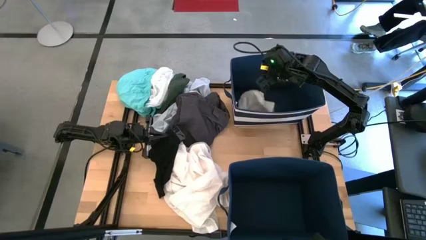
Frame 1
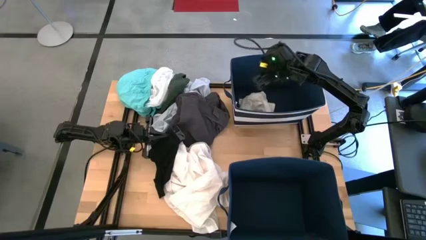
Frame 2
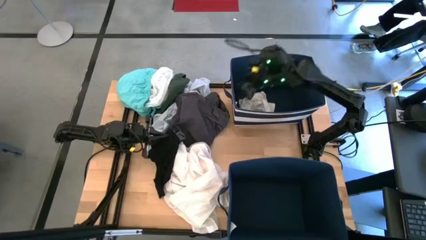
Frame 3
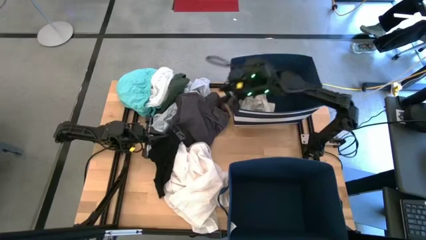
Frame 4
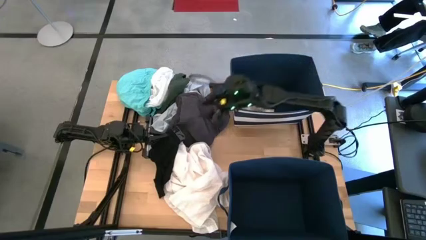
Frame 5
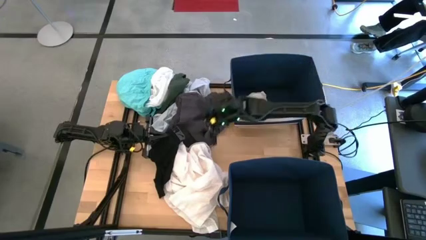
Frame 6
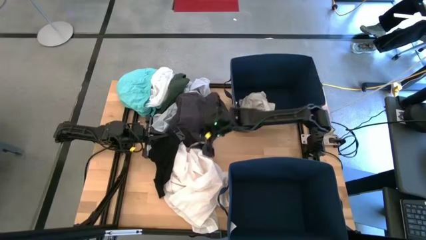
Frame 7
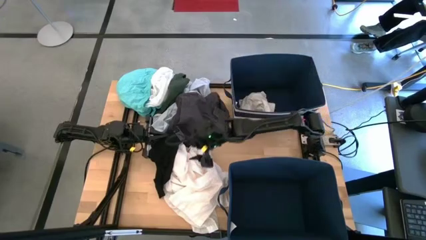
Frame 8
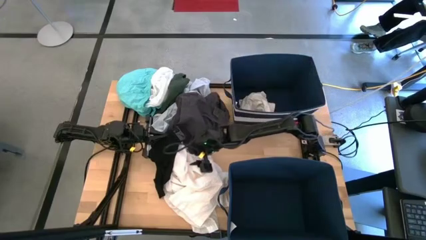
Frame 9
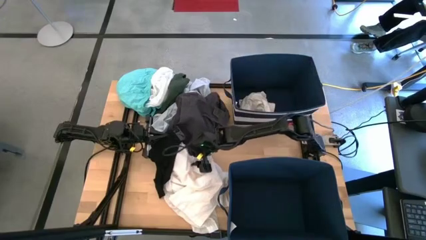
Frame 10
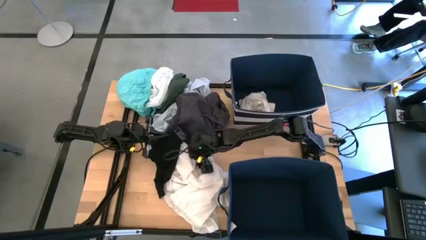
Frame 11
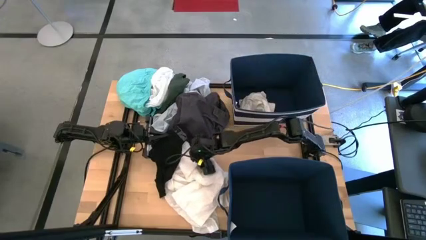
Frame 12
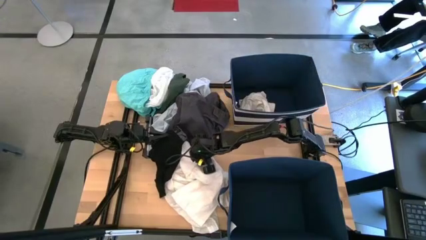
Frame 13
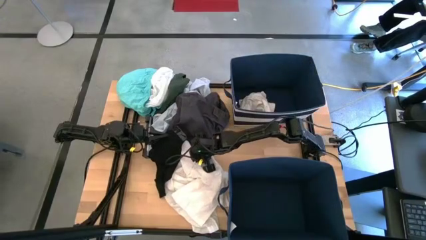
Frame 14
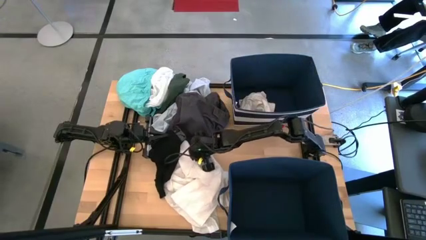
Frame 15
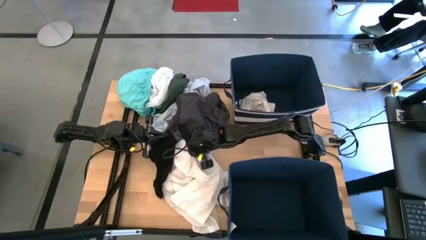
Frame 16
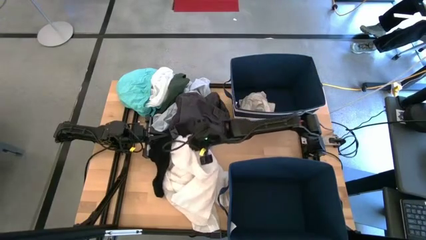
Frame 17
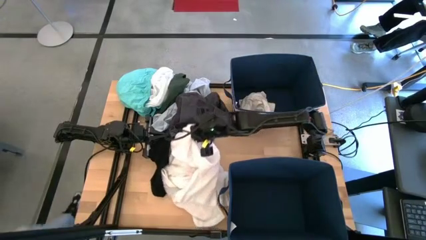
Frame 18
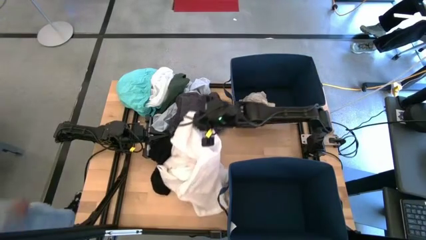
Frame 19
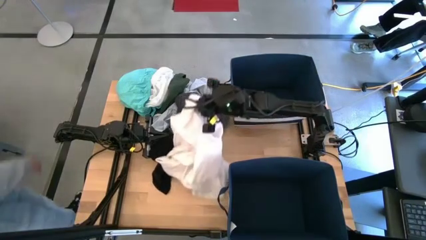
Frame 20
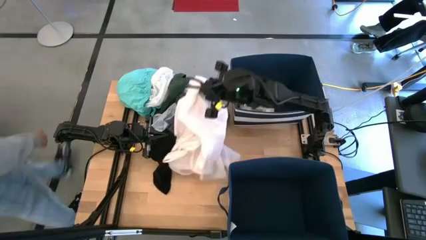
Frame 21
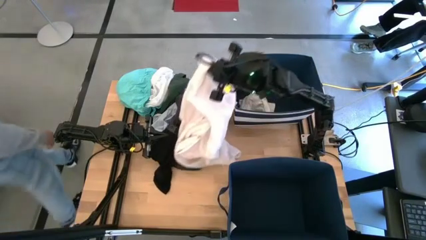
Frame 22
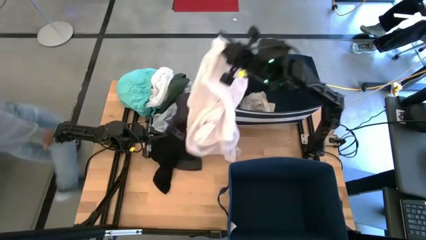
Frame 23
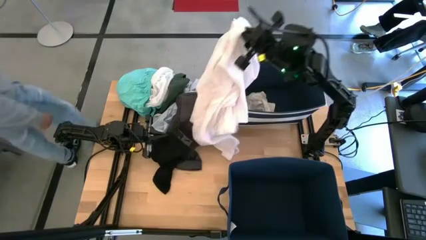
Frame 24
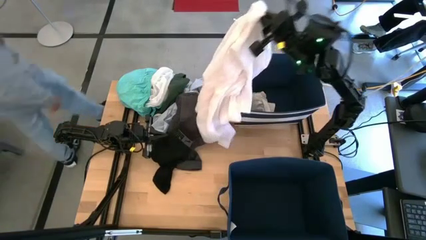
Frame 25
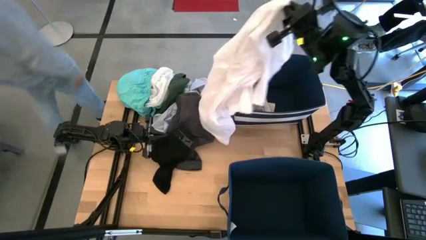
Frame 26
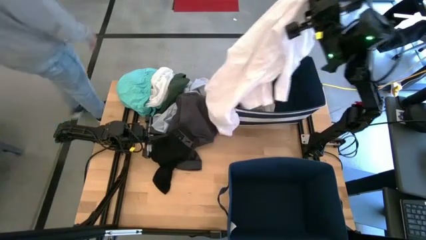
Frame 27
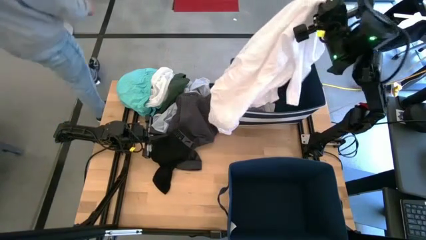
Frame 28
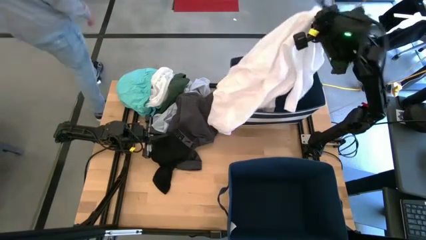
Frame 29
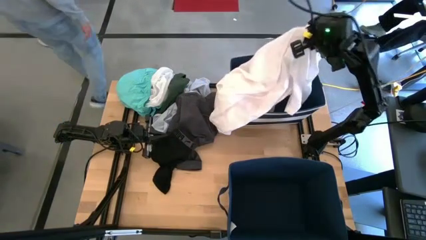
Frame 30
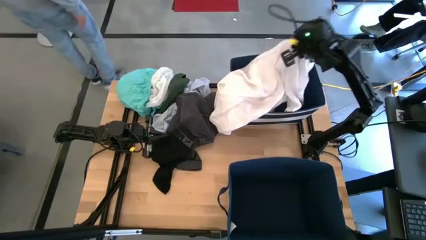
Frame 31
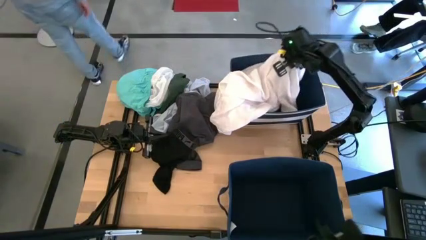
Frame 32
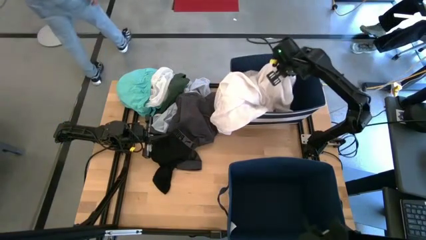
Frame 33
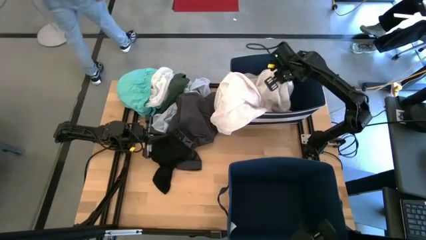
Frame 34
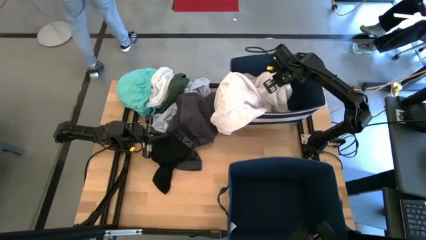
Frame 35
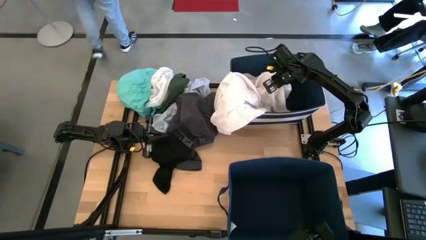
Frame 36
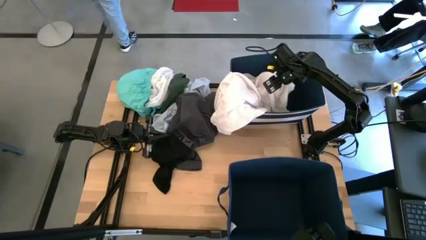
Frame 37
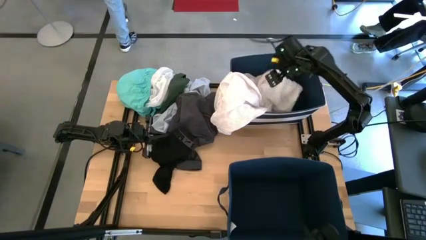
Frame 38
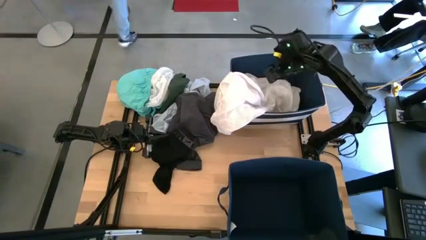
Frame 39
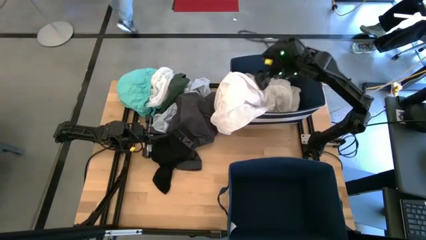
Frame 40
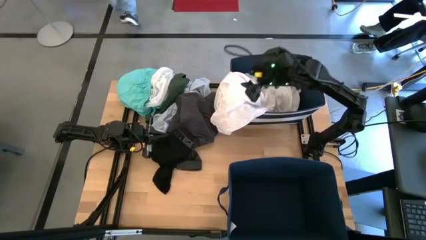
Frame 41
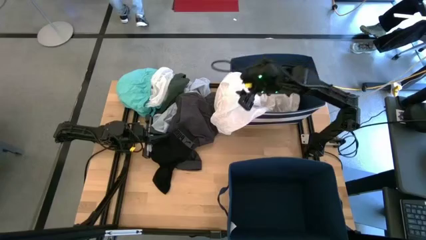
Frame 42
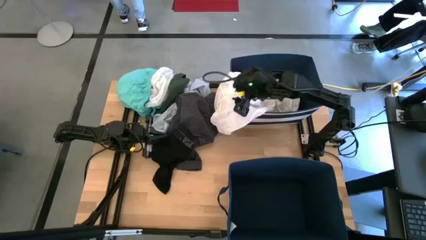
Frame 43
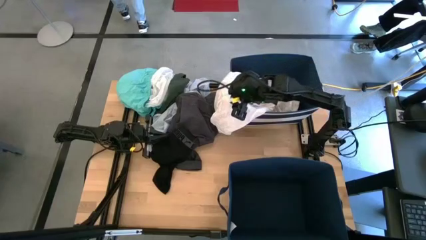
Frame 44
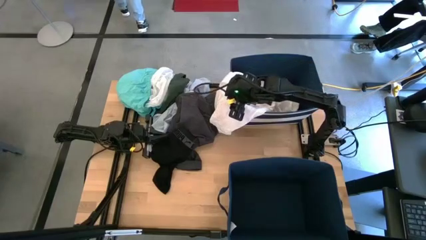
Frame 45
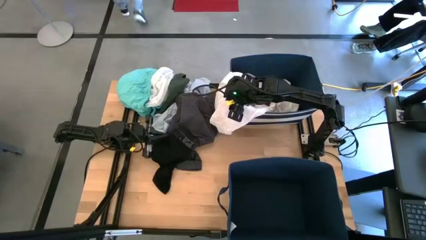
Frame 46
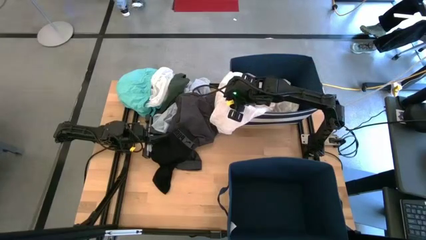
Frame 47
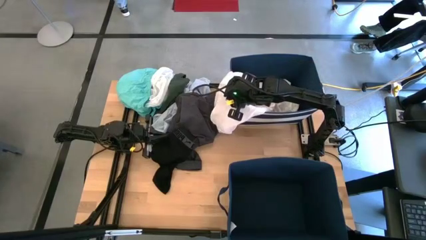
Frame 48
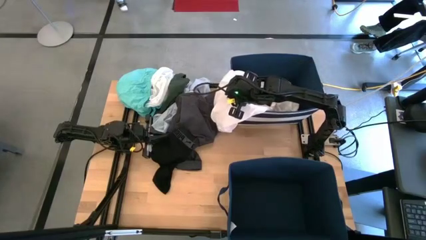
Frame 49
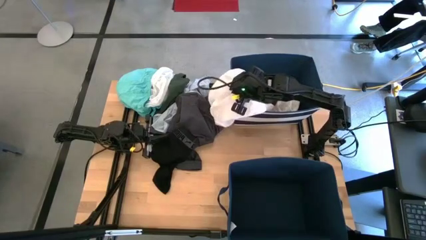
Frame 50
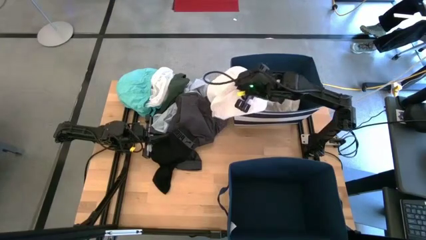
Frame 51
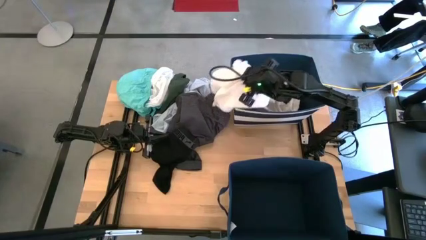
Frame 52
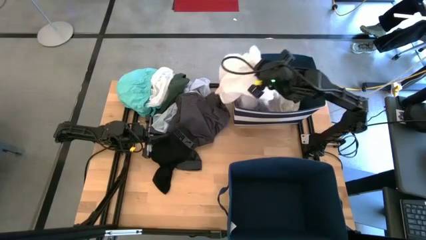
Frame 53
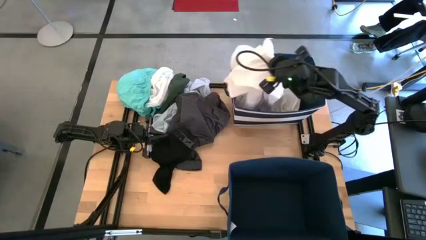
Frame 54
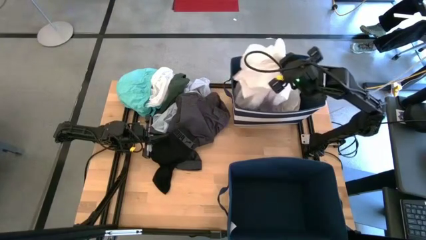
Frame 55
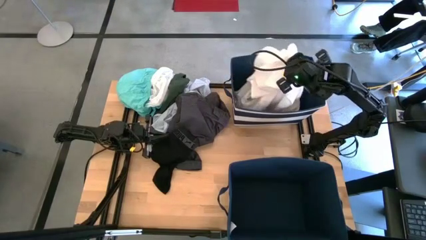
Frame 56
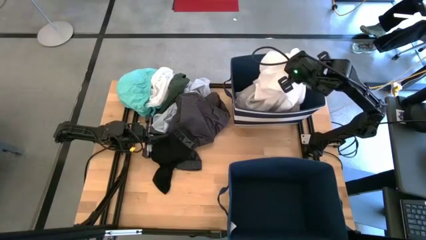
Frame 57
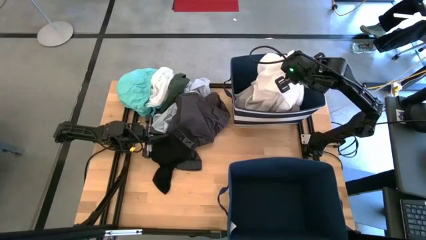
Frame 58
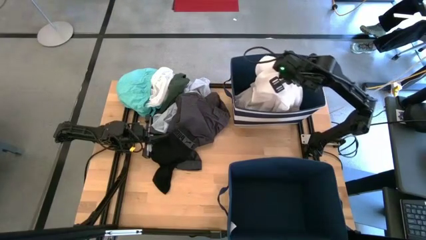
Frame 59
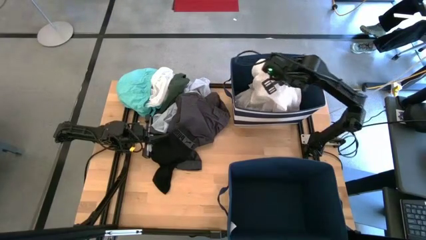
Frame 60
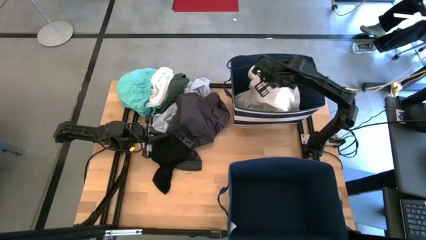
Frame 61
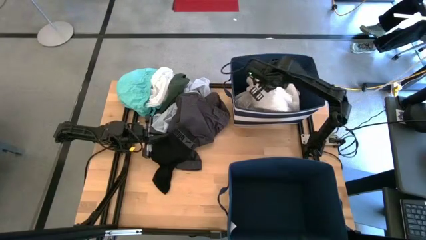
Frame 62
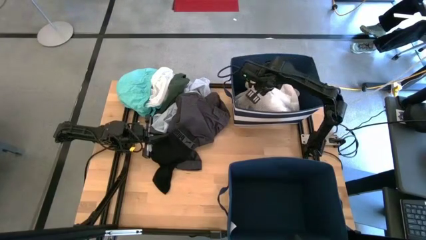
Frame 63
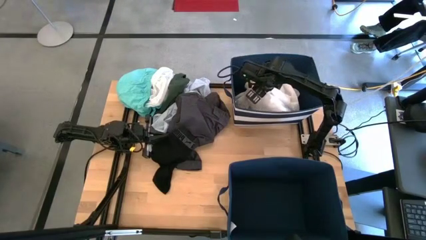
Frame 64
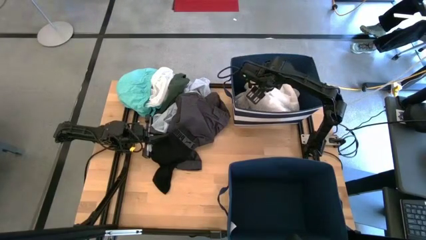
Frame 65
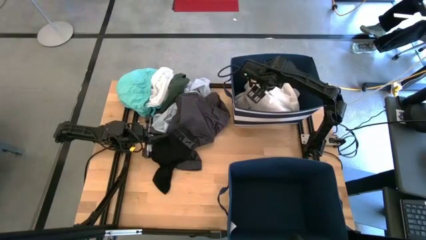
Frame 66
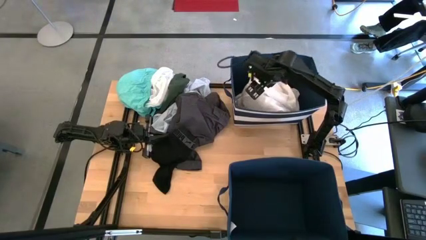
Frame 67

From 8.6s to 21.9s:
Task: Sort clothes
Put the white long sleeve polo into the top blue laundry organizer
